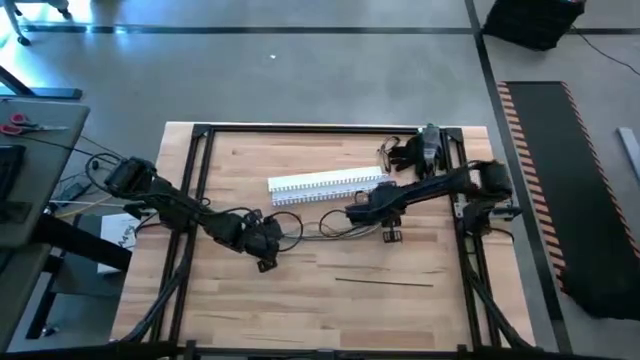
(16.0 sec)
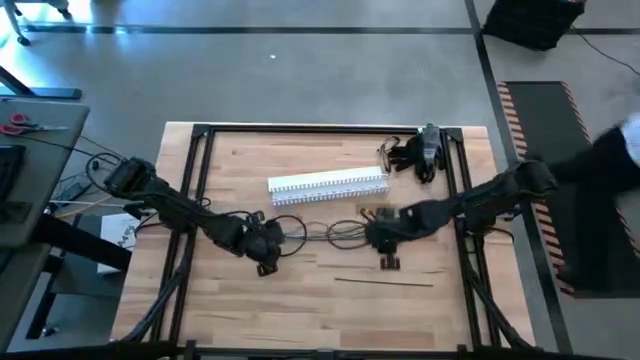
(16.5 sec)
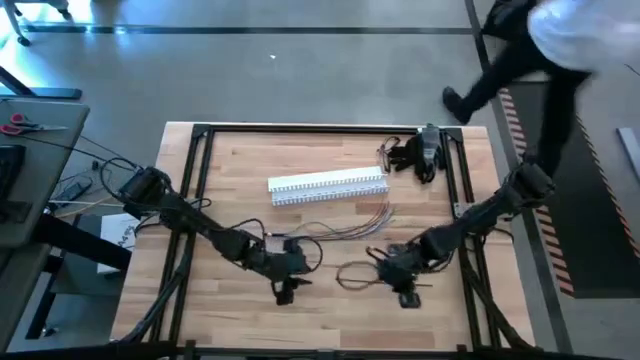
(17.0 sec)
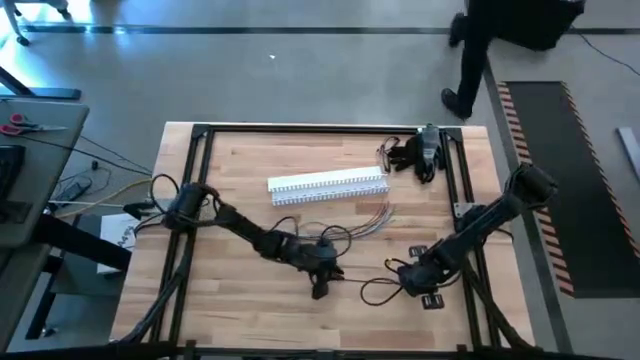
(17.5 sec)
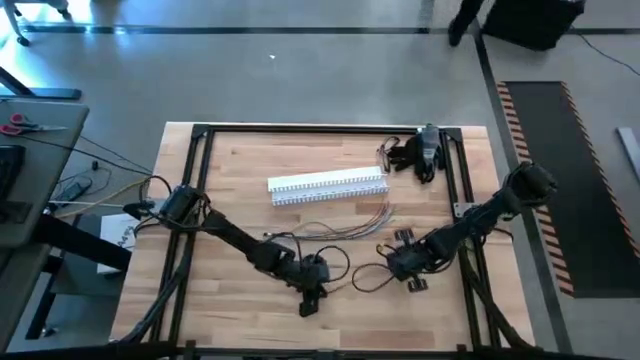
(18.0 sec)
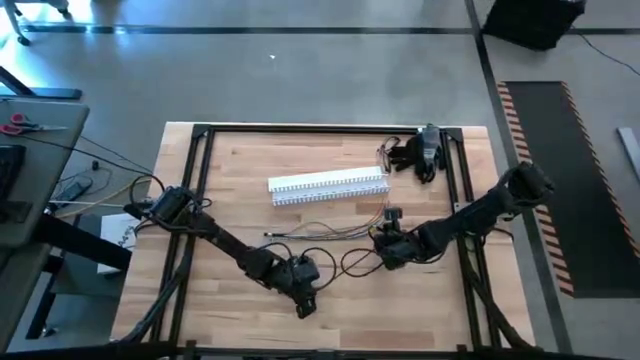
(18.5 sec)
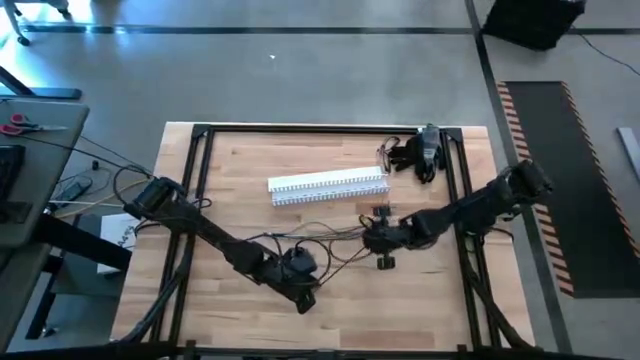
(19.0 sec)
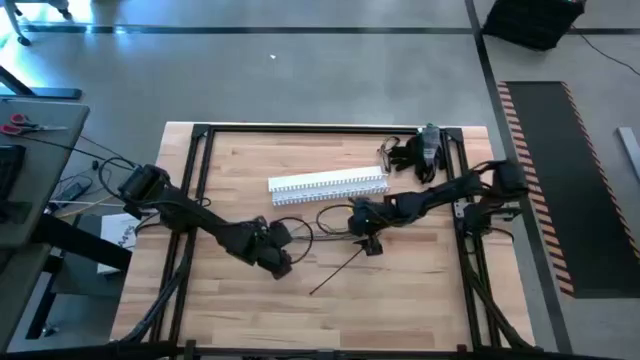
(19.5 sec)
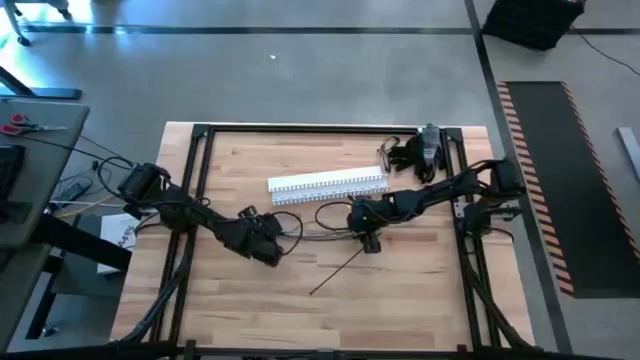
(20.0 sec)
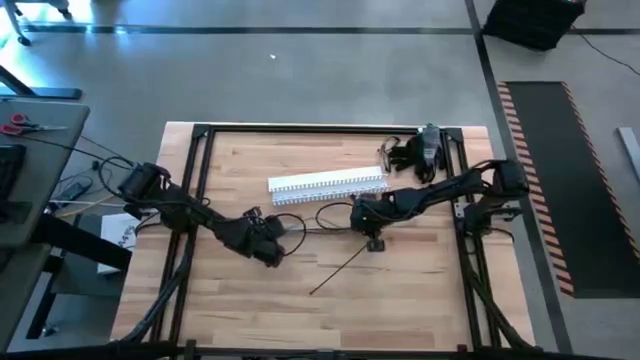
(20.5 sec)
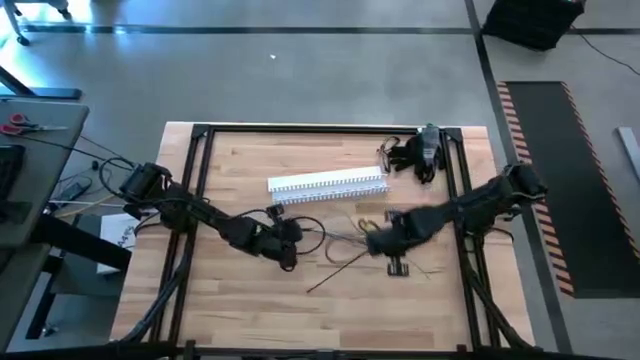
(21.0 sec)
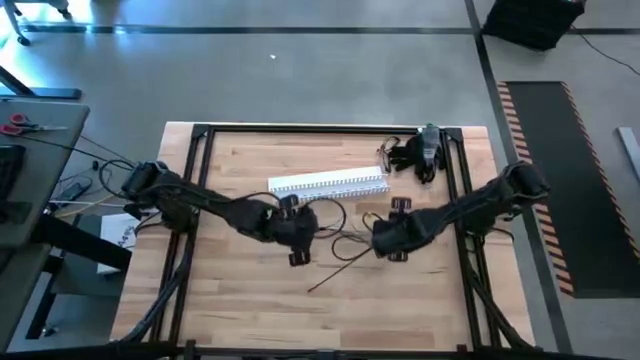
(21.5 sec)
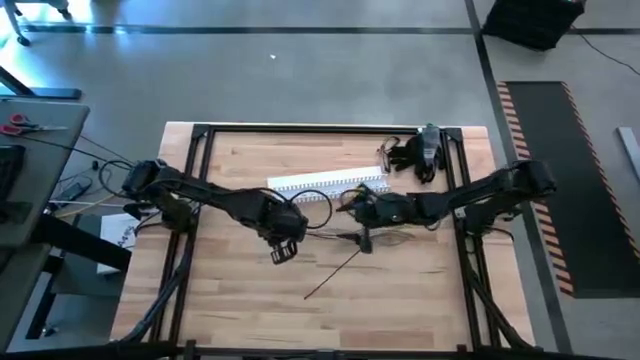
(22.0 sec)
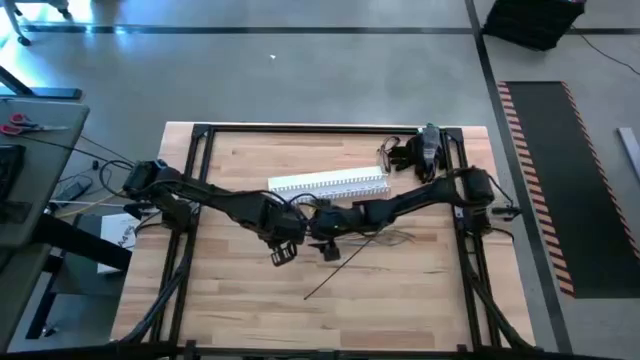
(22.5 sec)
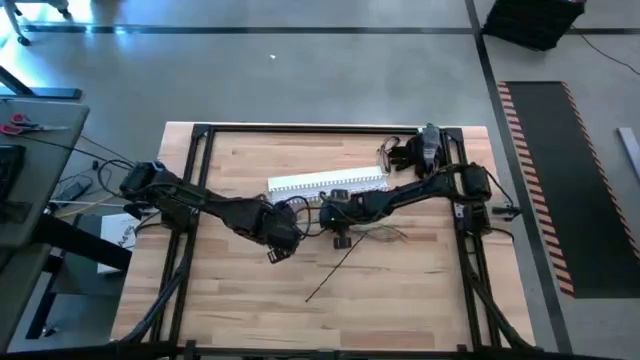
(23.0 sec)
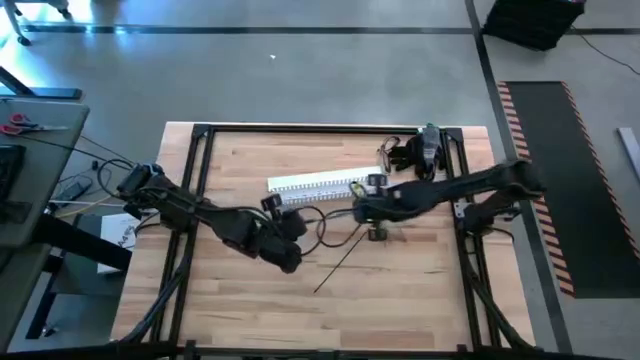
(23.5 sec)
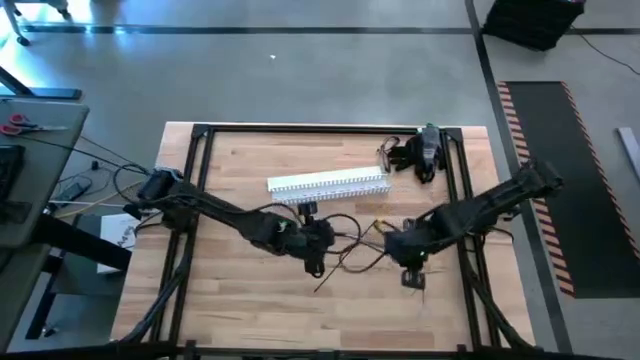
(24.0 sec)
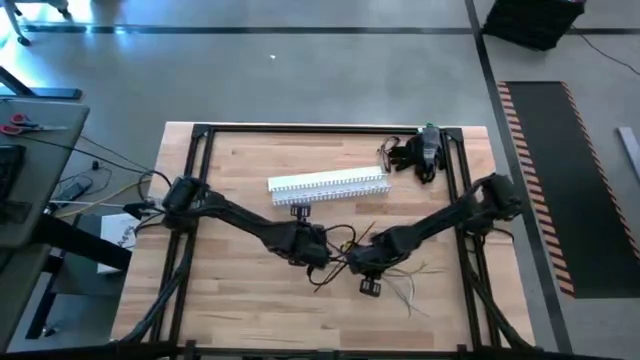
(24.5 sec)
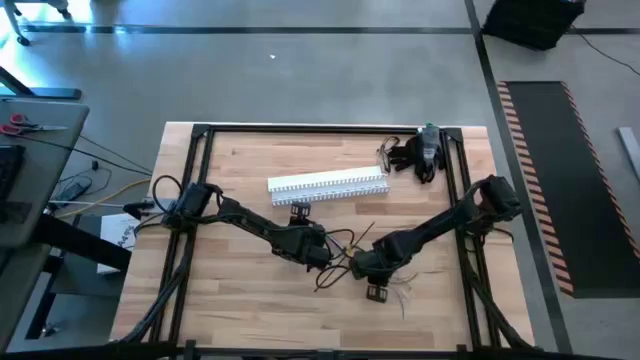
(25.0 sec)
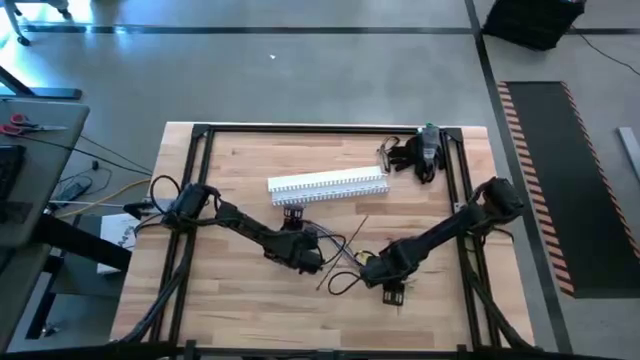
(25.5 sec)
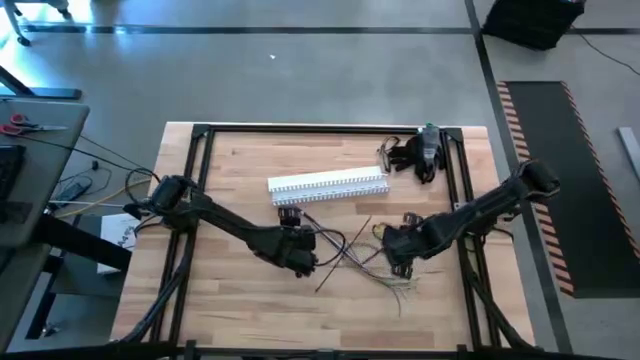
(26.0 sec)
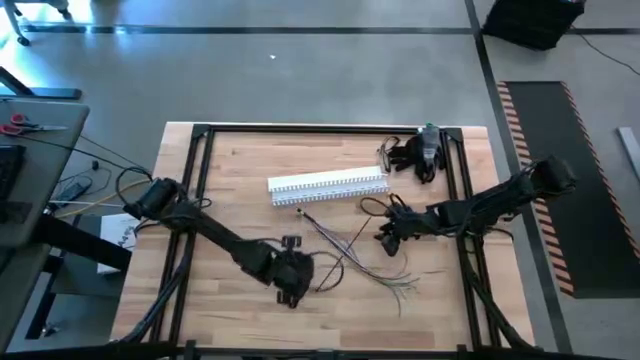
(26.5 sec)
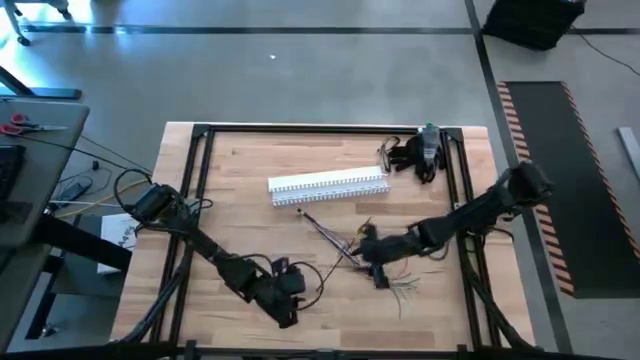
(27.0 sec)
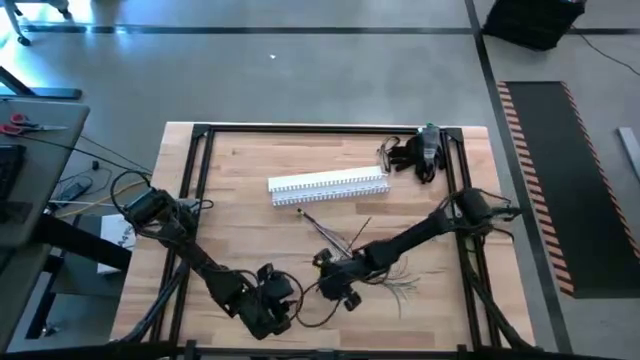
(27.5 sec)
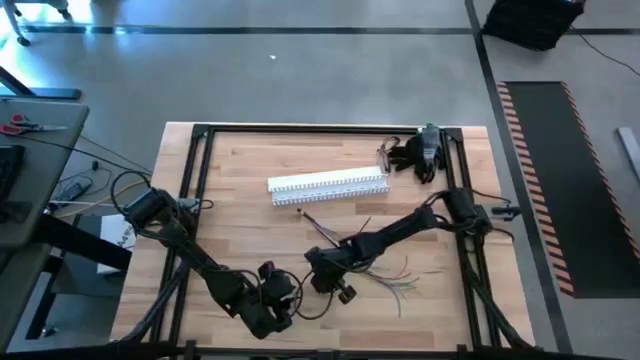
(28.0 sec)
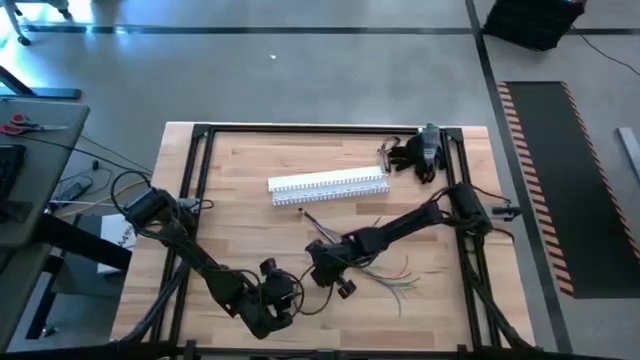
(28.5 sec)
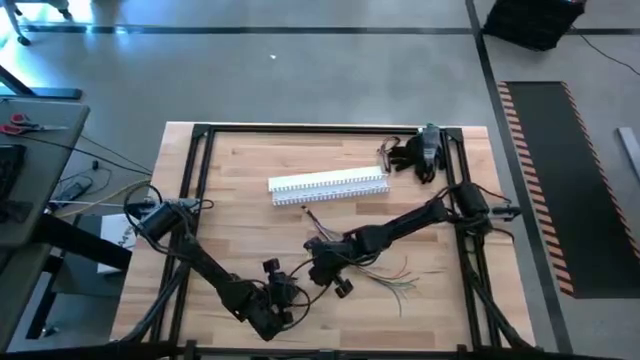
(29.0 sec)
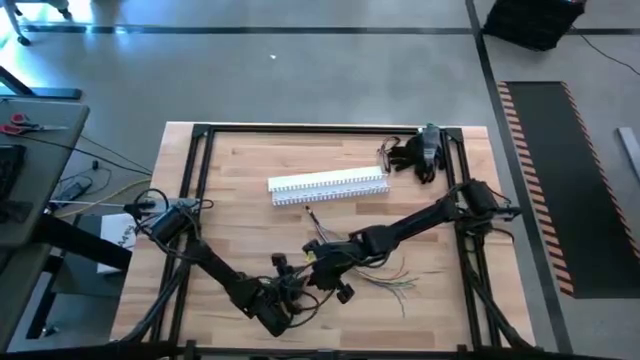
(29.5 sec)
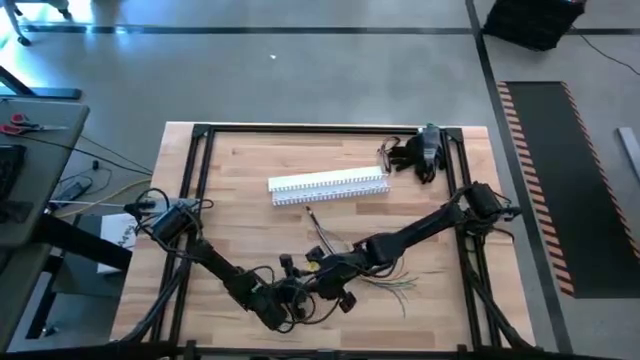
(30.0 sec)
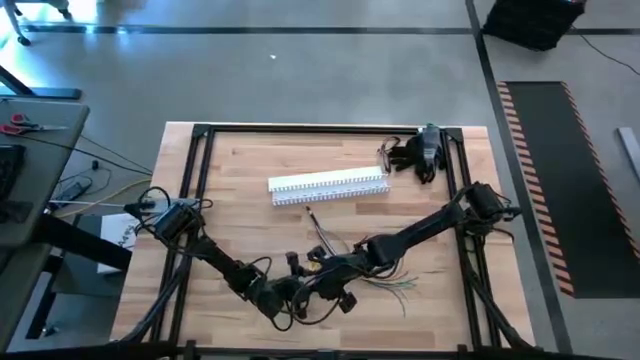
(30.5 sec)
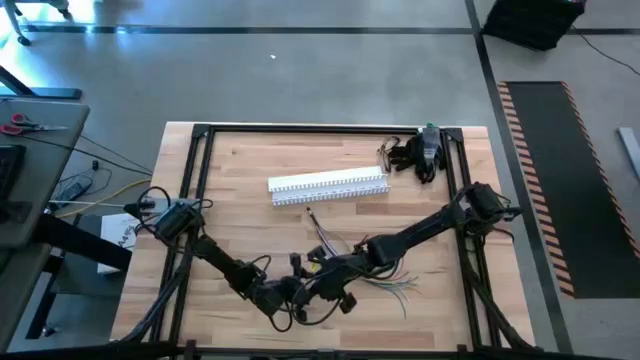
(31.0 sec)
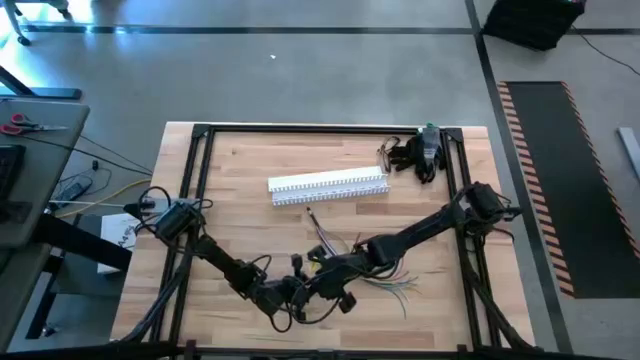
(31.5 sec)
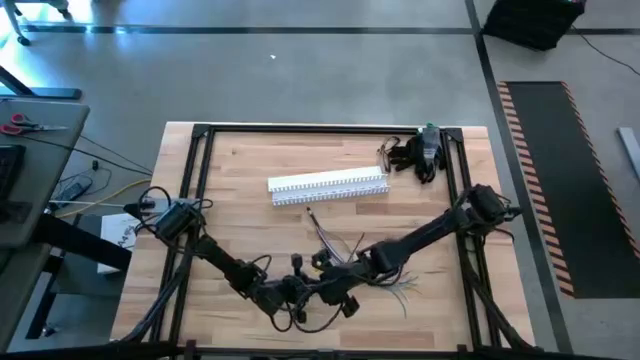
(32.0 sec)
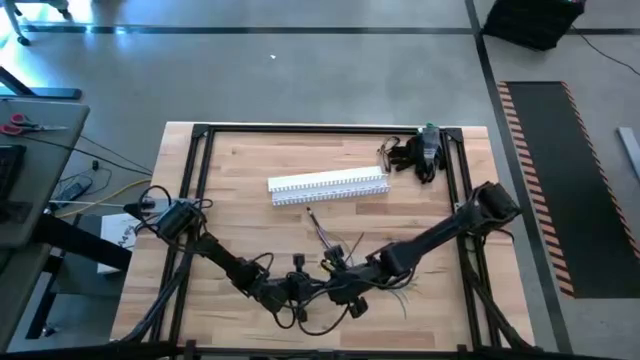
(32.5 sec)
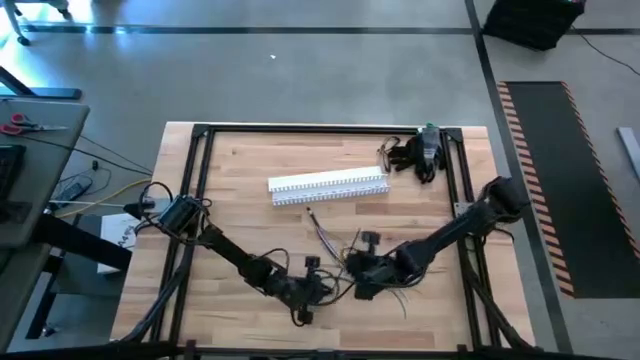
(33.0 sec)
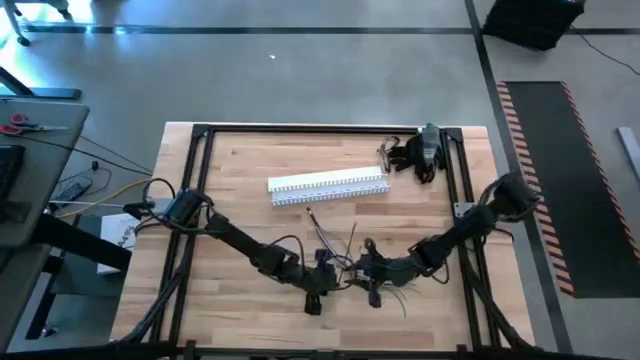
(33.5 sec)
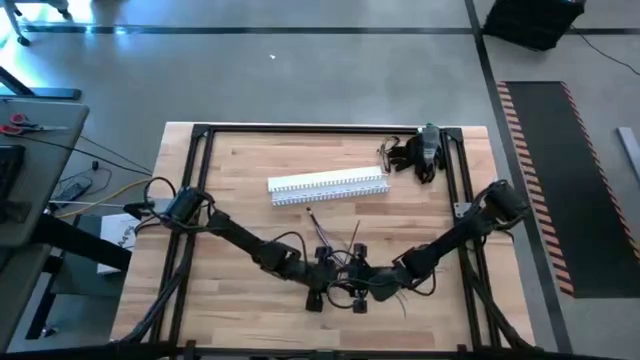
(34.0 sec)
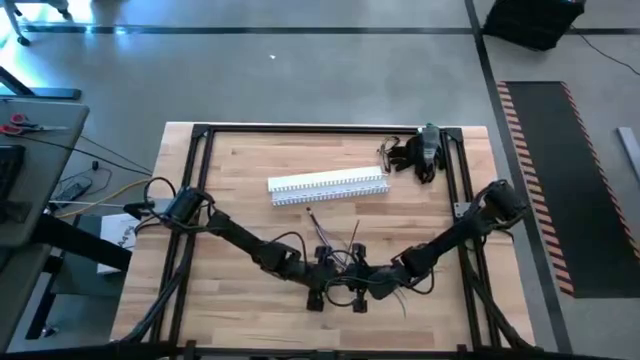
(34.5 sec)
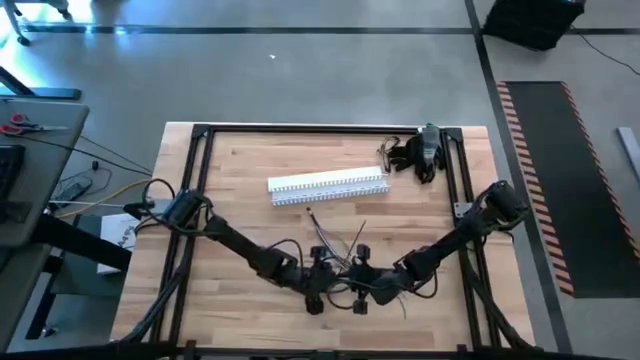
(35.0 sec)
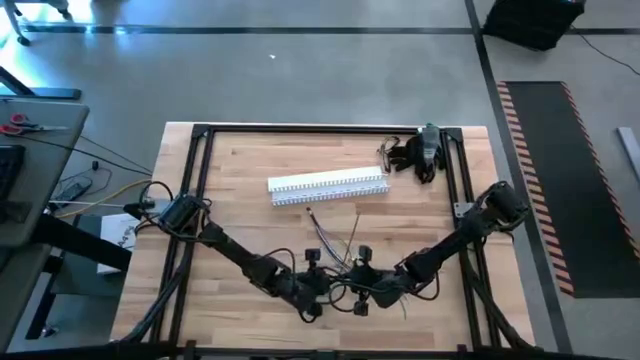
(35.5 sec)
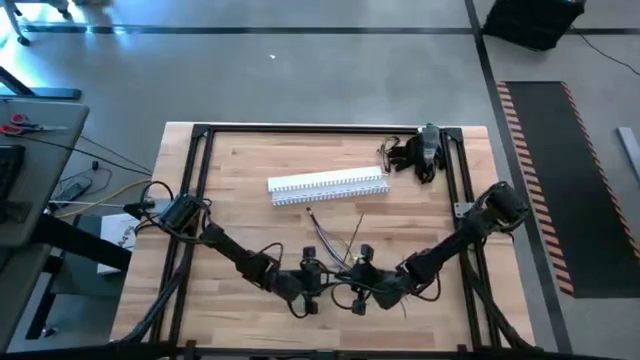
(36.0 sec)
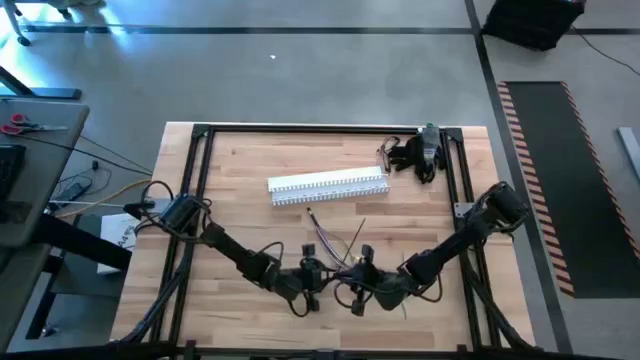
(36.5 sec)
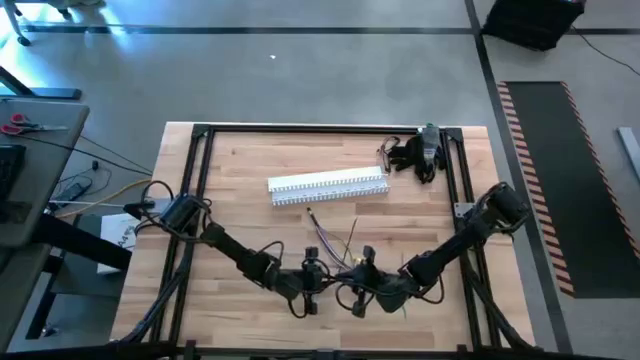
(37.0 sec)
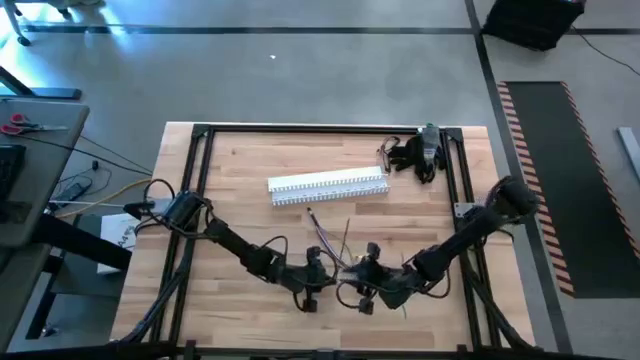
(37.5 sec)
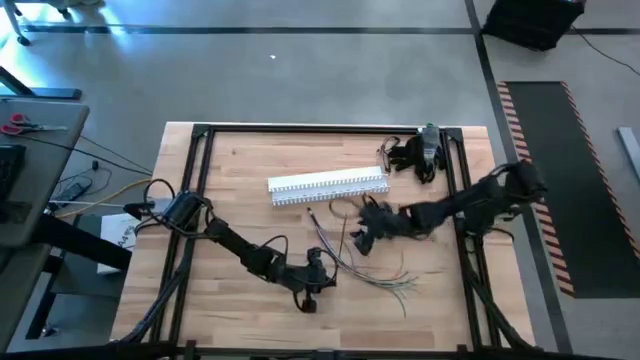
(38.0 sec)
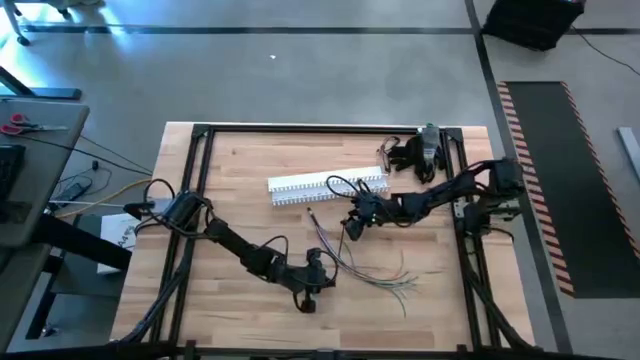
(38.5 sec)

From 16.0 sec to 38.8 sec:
Task: Ziptie cables
Wrap the cable wires with black ziptie
